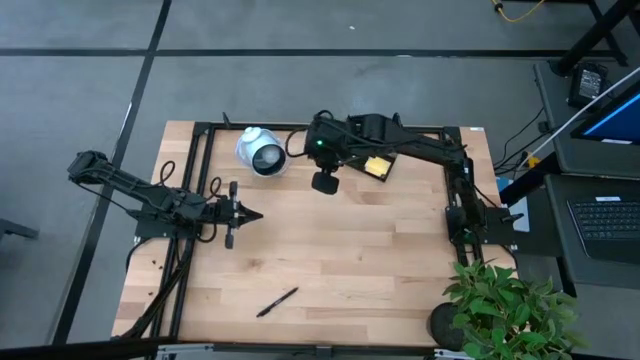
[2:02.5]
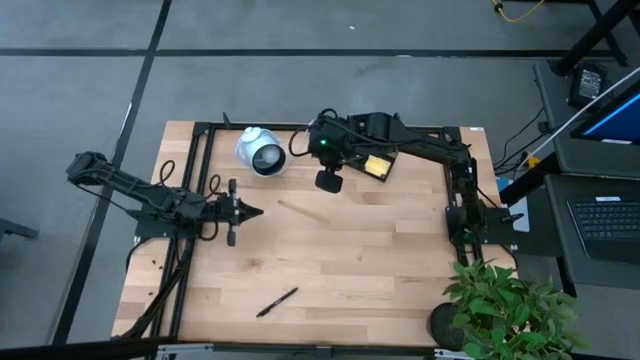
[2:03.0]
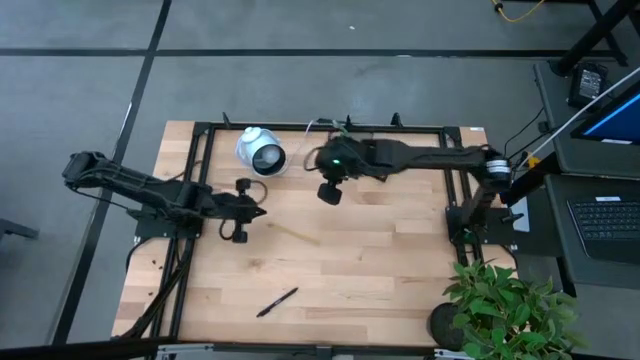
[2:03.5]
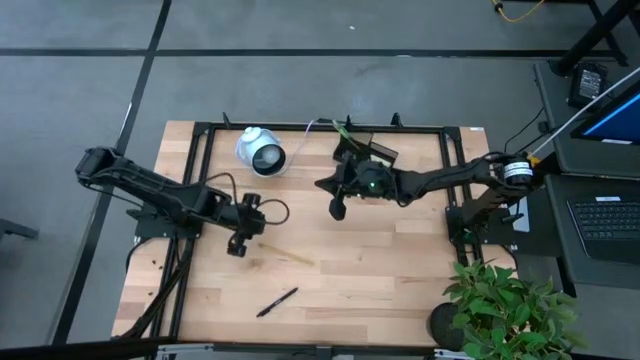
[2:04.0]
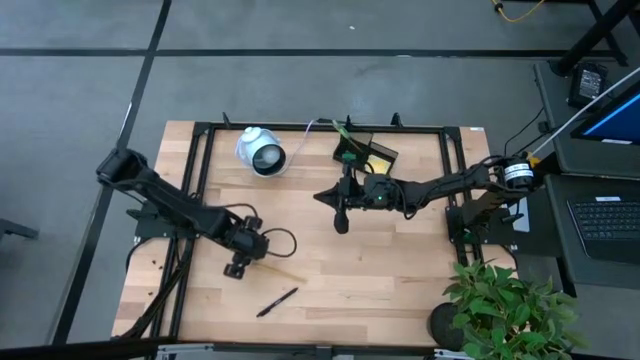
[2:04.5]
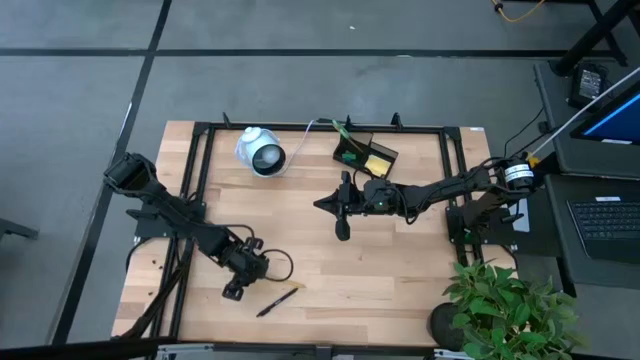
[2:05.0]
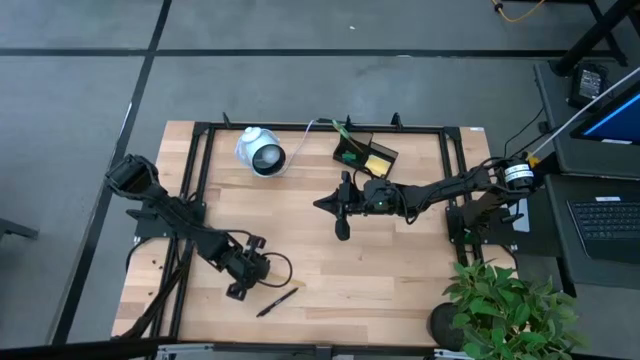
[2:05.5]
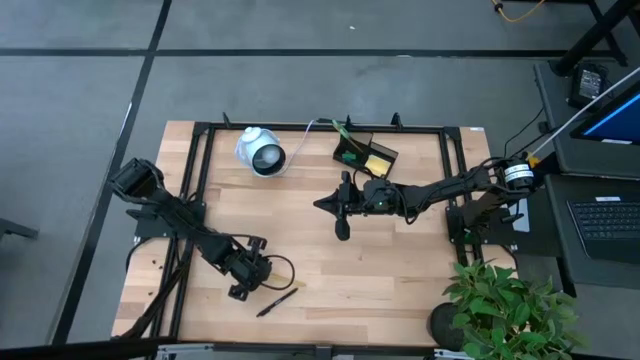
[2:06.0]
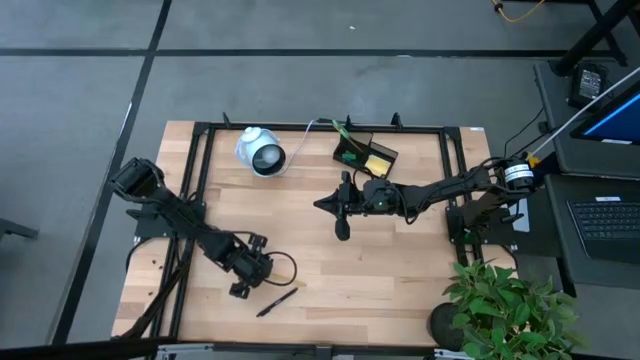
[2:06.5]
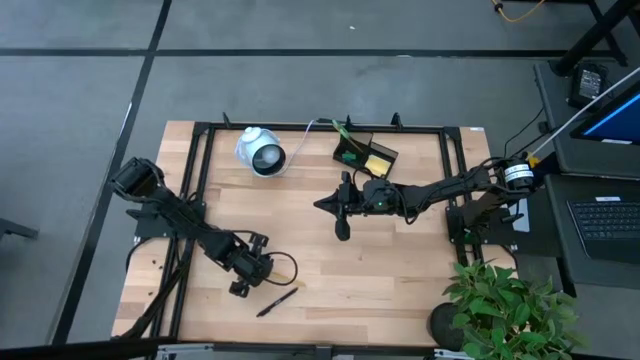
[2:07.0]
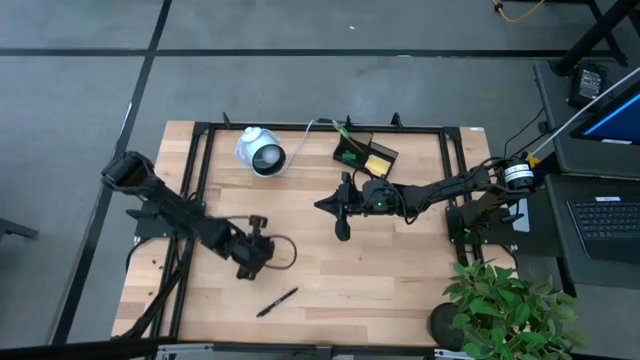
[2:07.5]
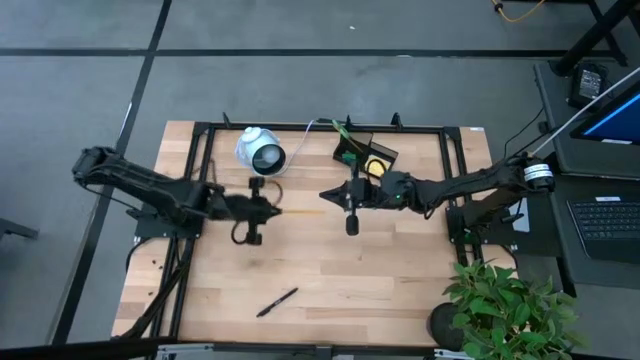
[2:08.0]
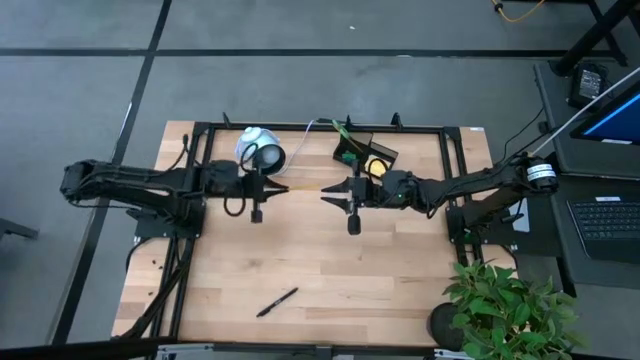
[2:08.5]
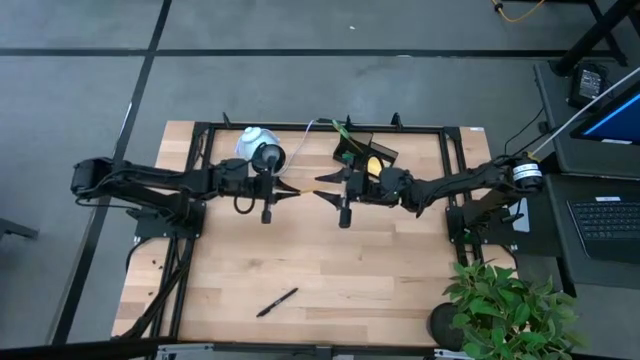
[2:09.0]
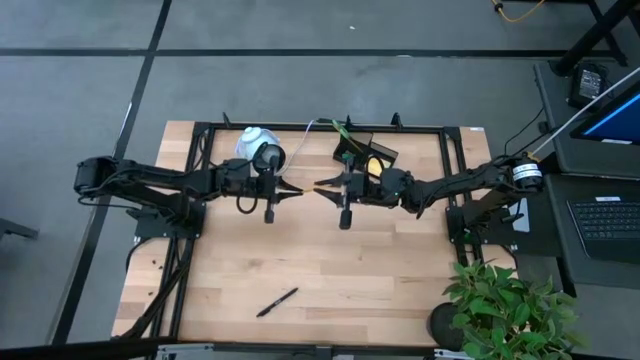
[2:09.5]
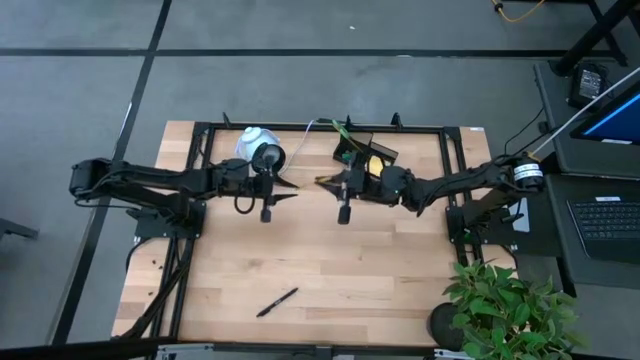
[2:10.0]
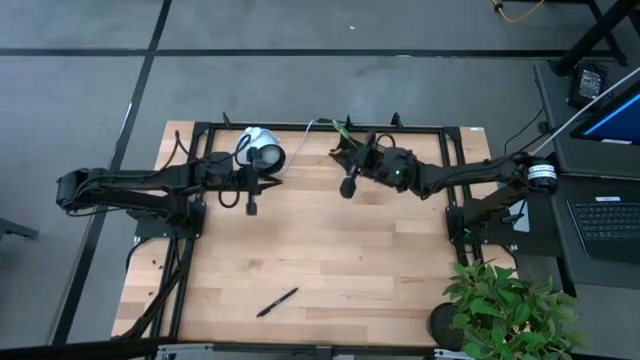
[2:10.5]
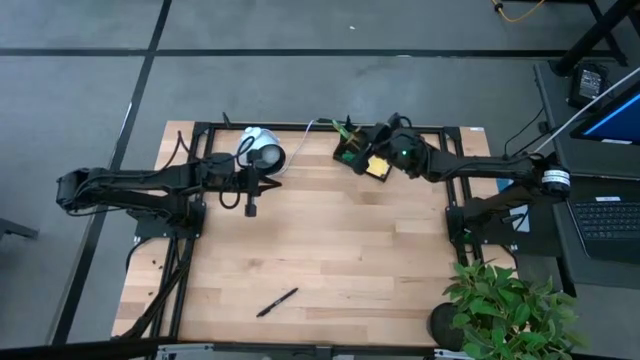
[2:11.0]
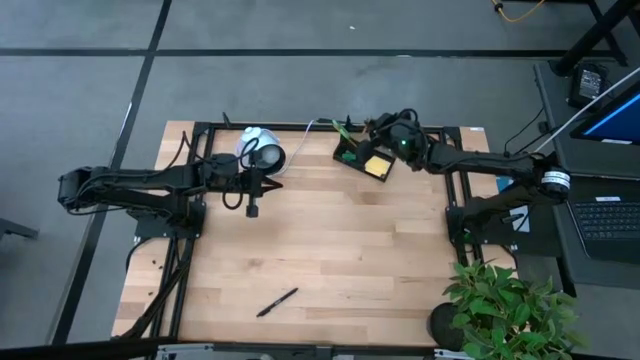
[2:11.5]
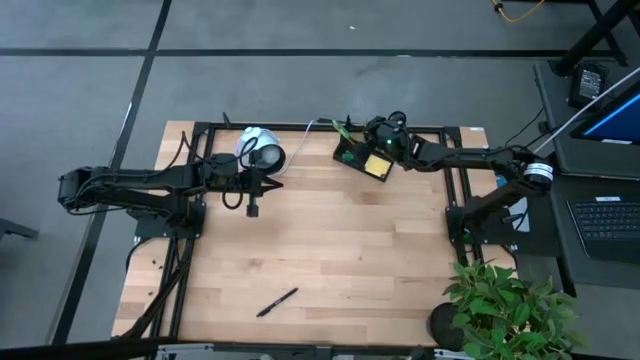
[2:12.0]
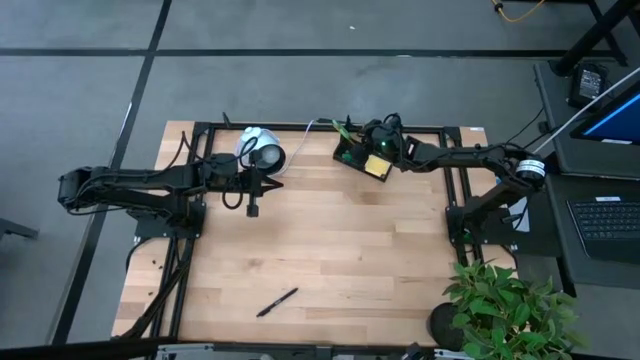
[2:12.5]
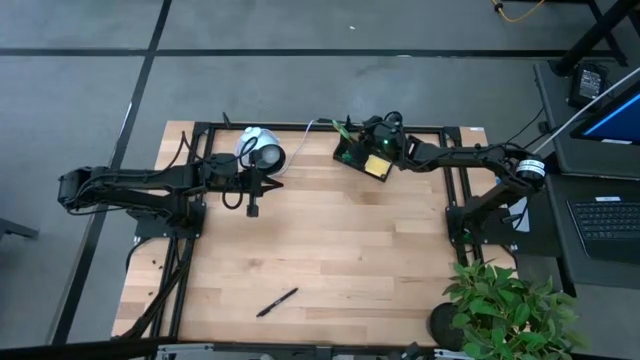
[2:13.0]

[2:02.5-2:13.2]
Task: Pick and place office supplies into organizer
Put the yellow pencil into the desk organizer

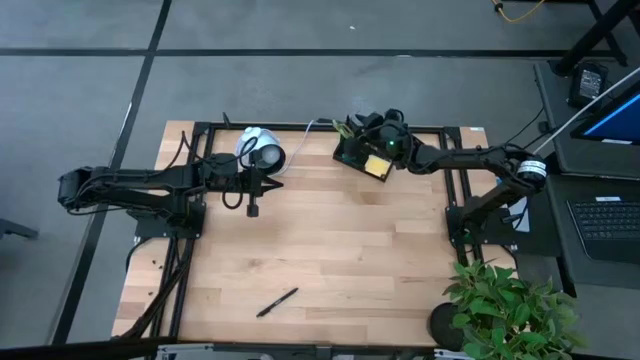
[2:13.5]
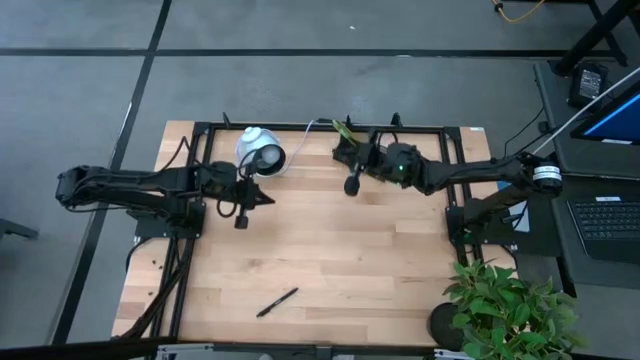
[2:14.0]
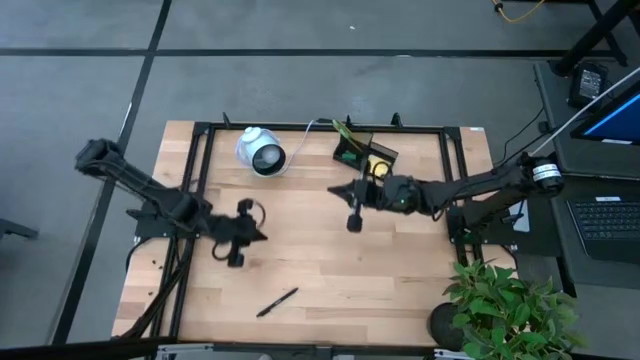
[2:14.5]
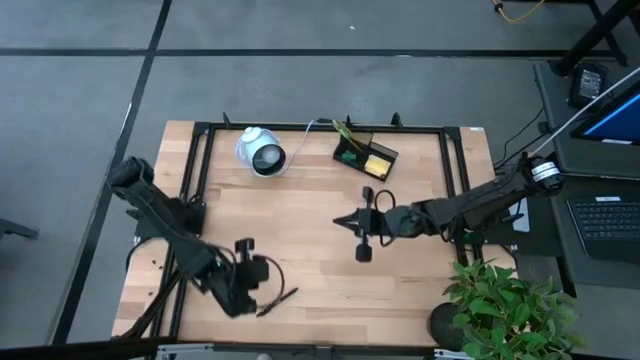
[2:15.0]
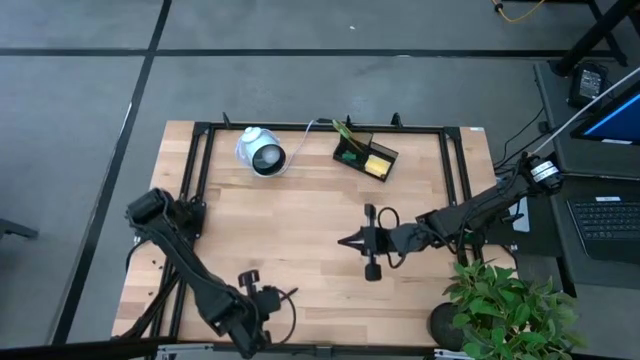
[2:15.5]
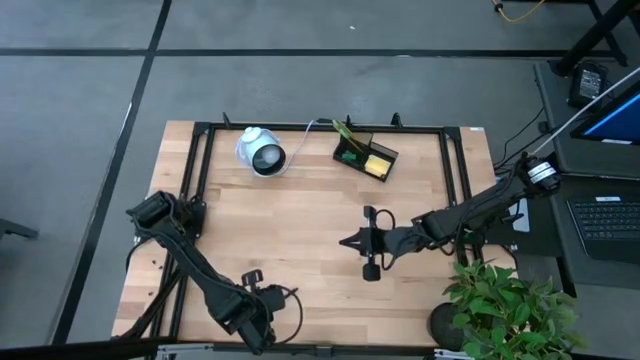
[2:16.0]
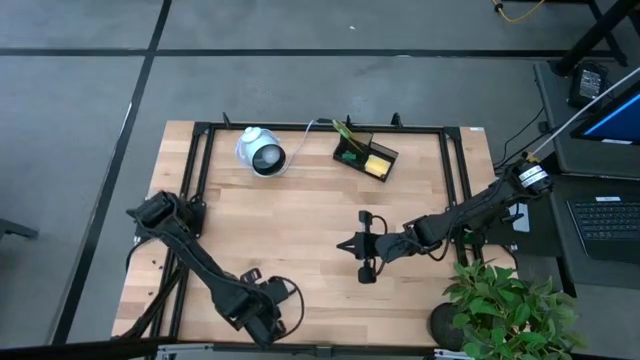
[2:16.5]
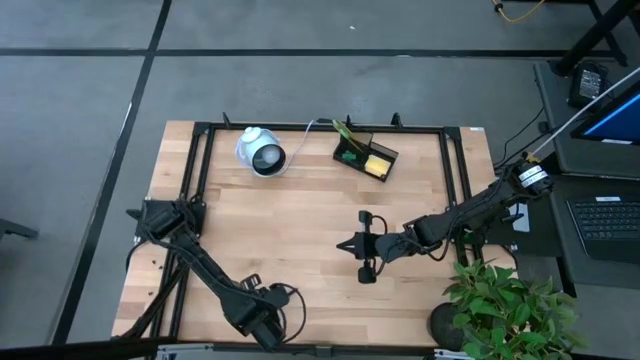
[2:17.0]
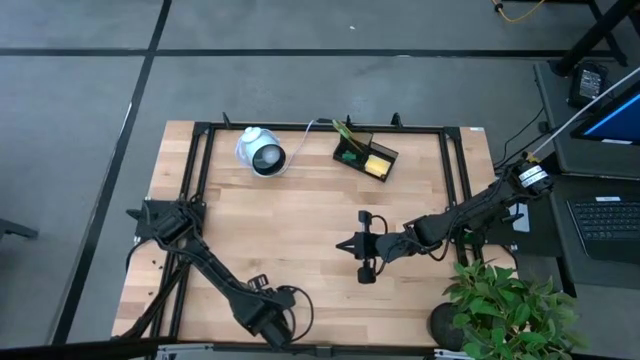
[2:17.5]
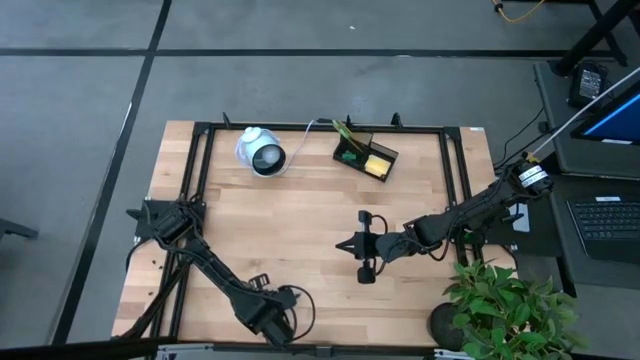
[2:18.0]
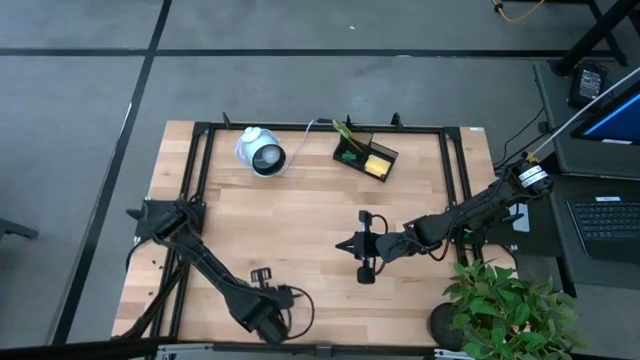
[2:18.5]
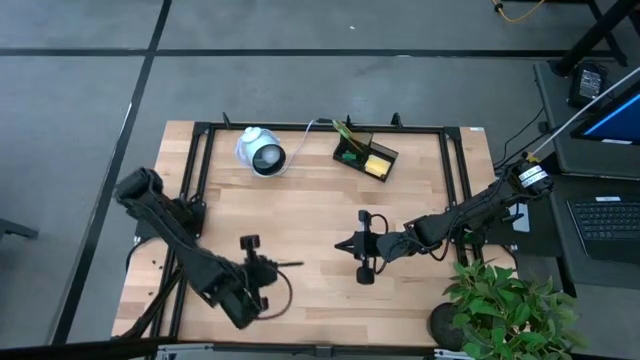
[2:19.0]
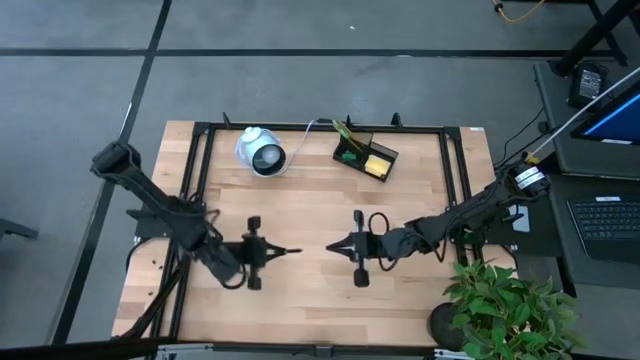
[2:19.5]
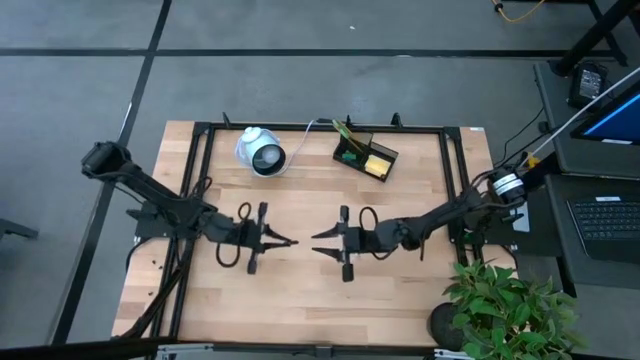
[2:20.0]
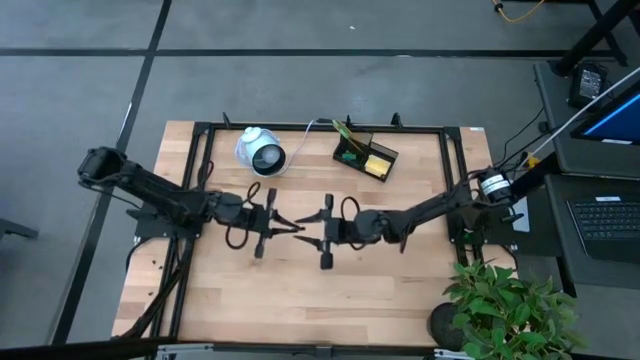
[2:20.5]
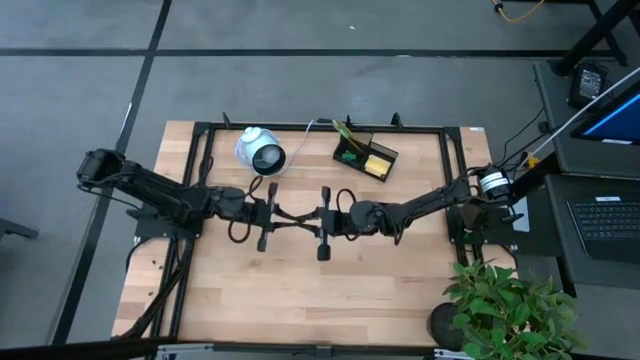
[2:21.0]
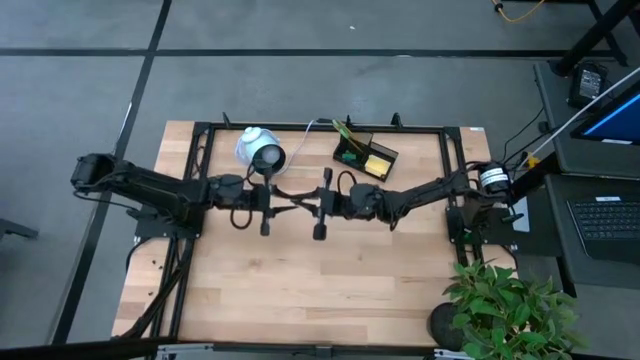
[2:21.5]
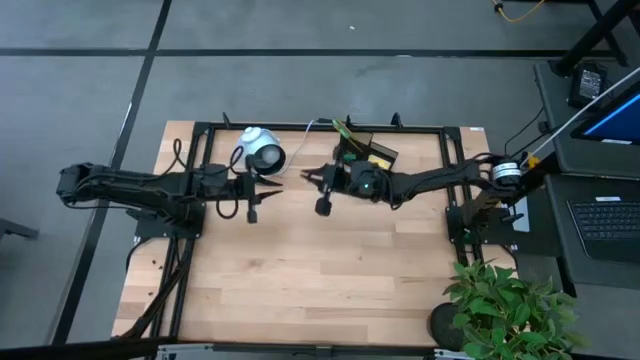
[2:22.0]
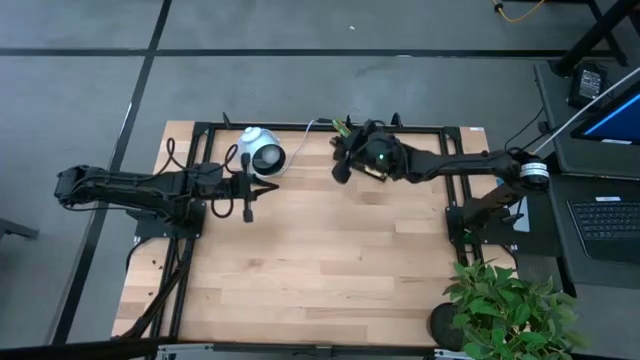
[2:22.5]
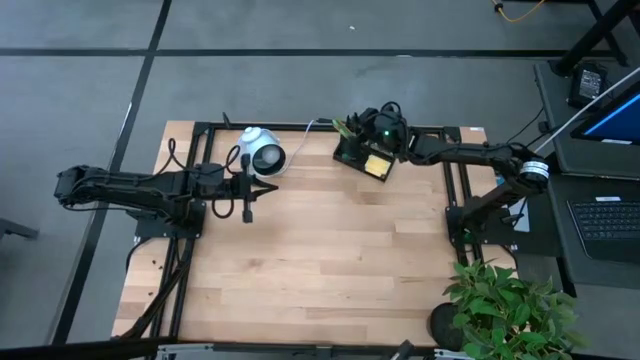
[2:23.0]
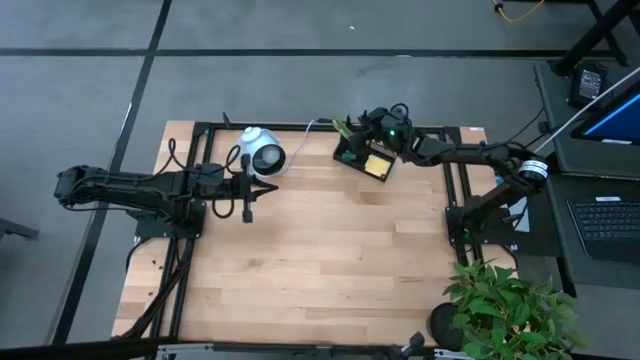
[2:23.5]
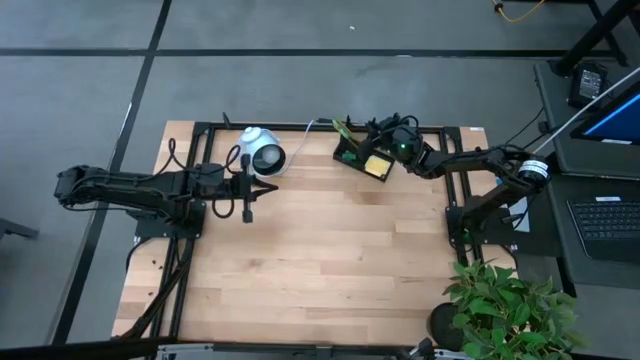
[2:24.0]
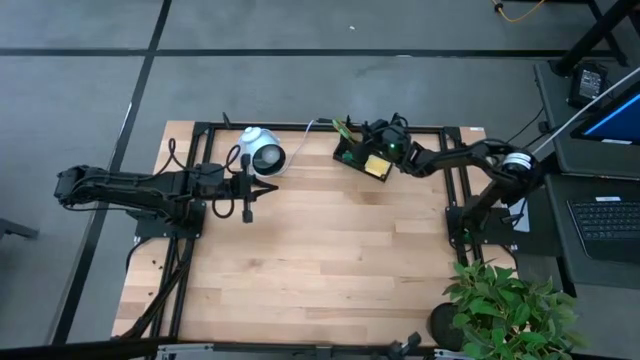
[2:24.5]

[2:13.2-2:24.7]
Put the black pen into the desk organizer
